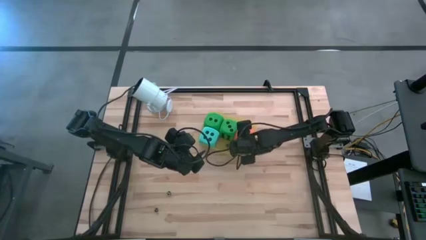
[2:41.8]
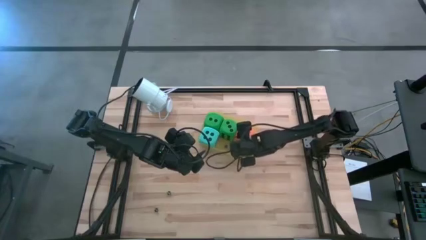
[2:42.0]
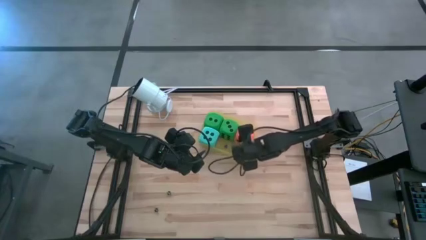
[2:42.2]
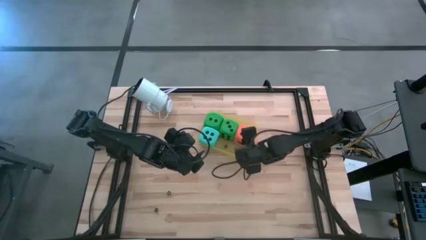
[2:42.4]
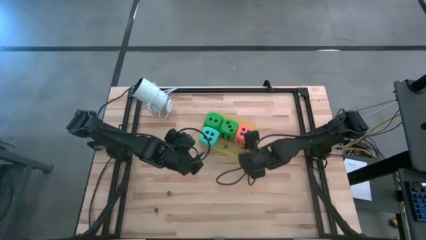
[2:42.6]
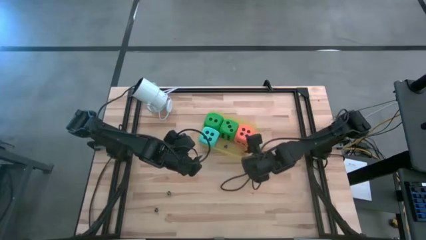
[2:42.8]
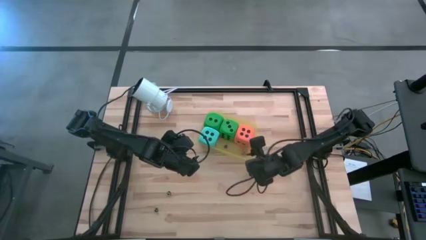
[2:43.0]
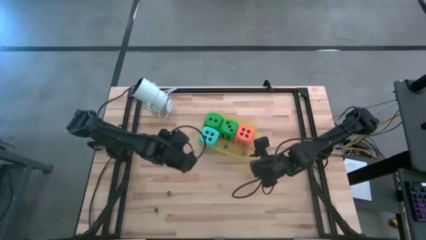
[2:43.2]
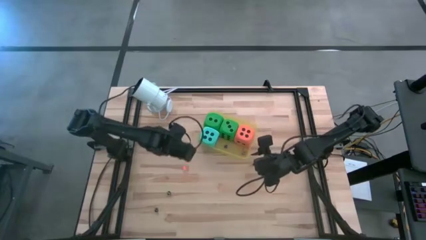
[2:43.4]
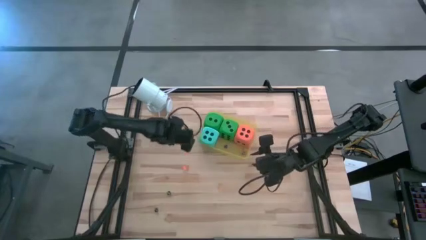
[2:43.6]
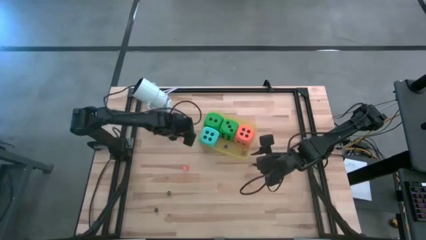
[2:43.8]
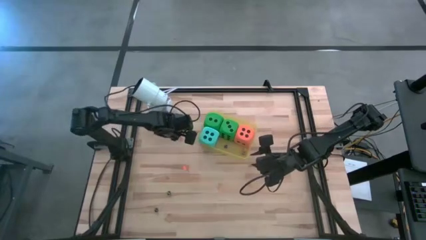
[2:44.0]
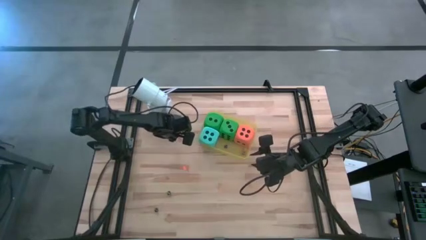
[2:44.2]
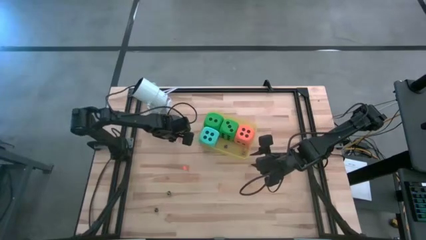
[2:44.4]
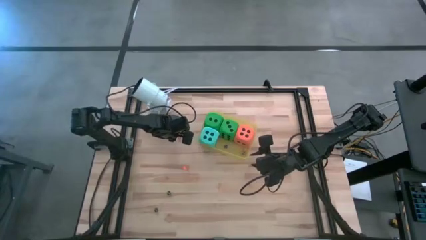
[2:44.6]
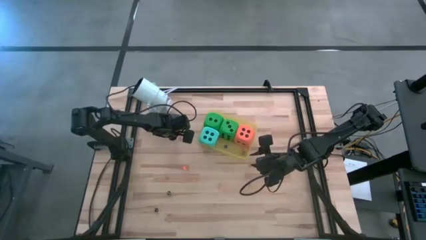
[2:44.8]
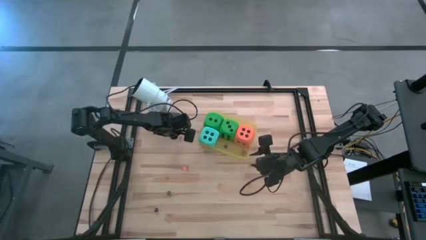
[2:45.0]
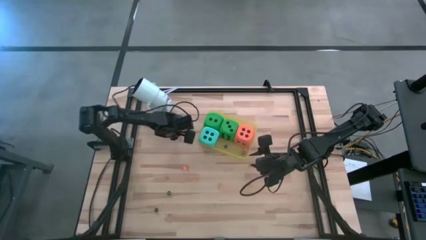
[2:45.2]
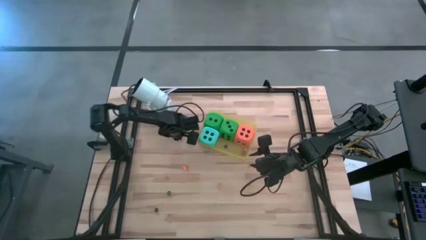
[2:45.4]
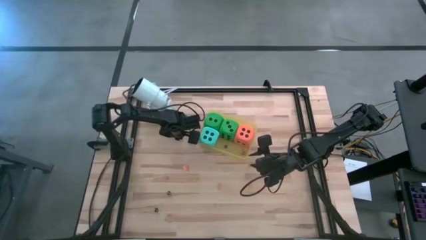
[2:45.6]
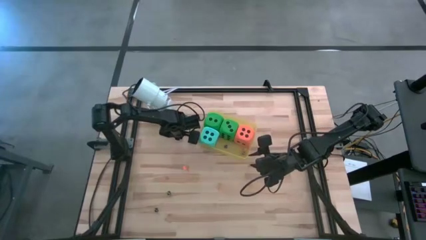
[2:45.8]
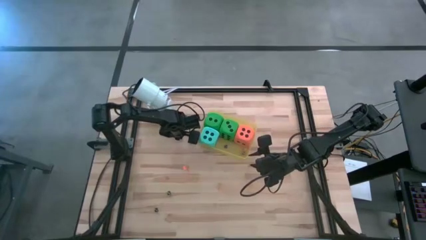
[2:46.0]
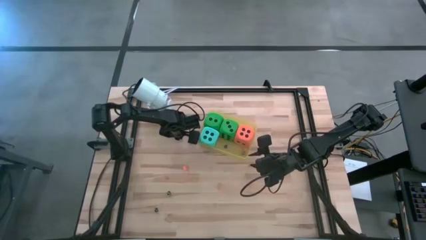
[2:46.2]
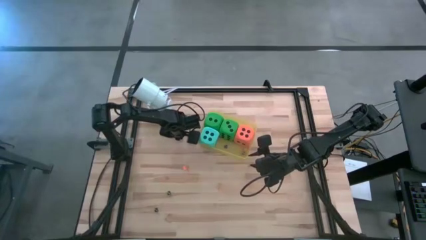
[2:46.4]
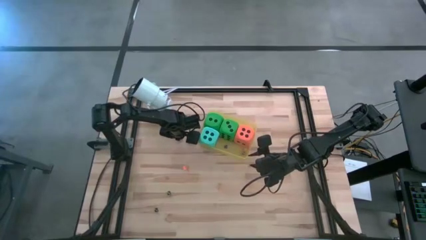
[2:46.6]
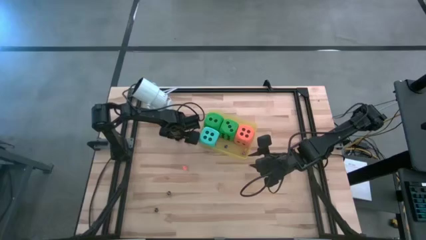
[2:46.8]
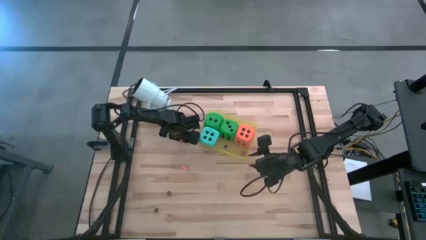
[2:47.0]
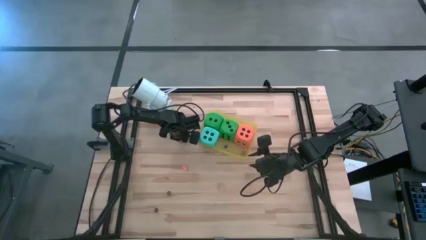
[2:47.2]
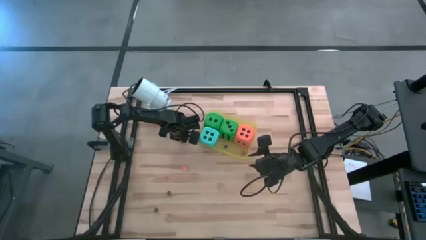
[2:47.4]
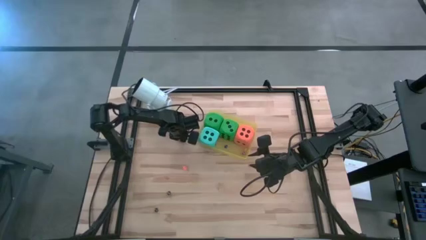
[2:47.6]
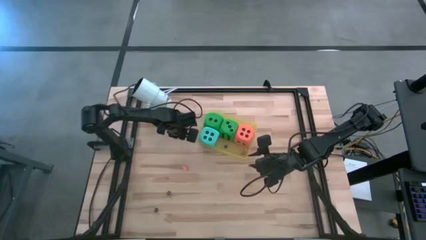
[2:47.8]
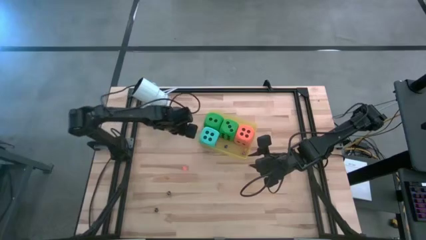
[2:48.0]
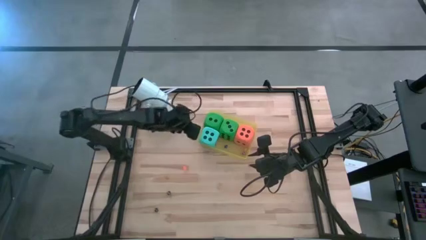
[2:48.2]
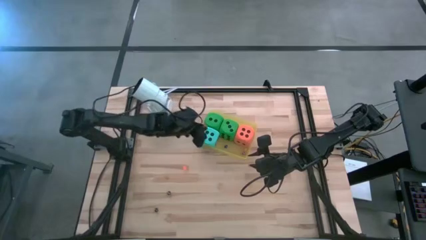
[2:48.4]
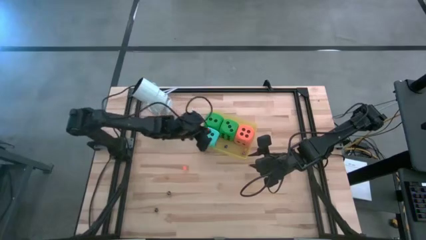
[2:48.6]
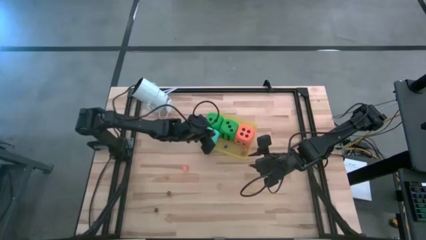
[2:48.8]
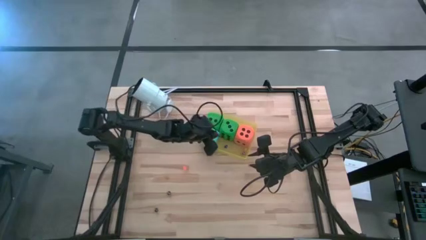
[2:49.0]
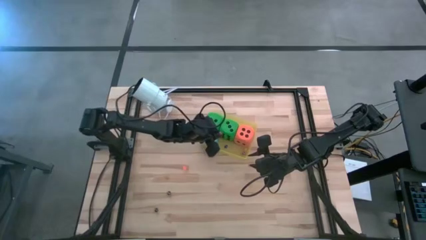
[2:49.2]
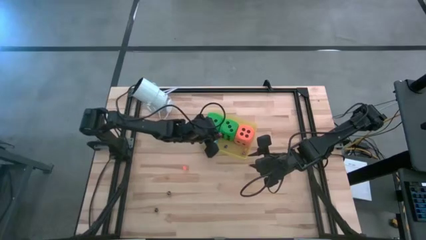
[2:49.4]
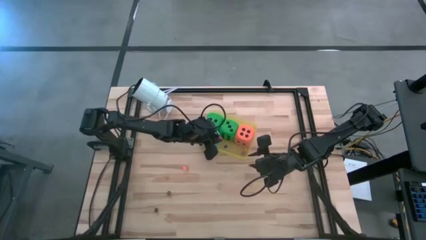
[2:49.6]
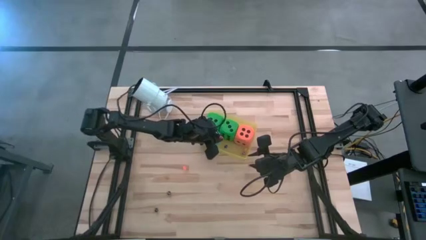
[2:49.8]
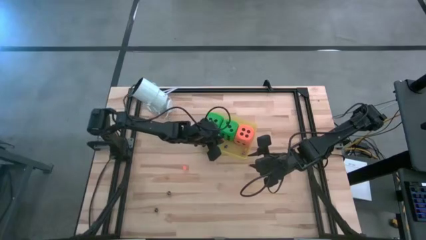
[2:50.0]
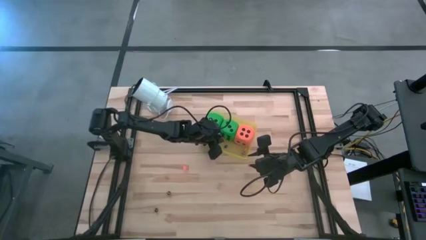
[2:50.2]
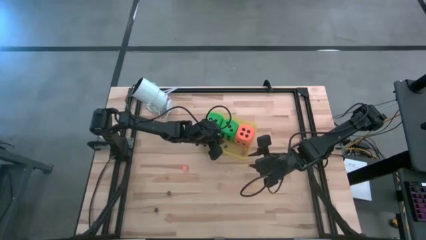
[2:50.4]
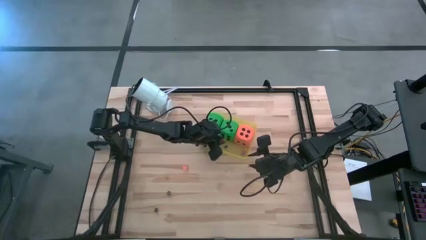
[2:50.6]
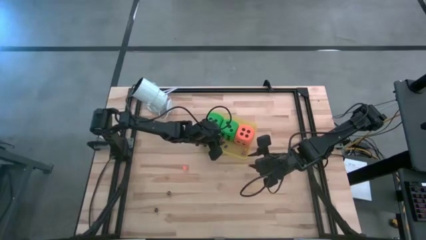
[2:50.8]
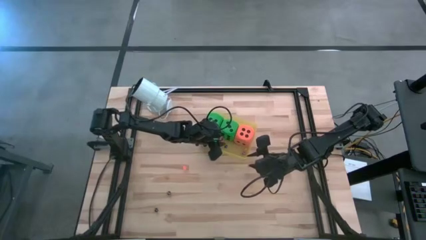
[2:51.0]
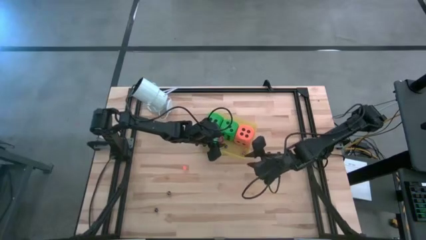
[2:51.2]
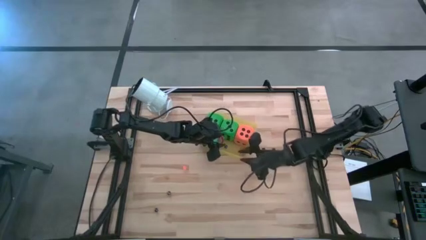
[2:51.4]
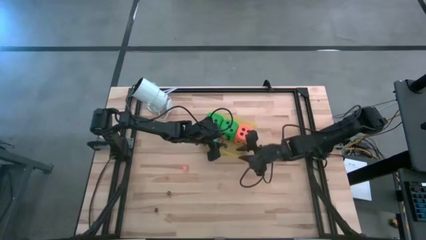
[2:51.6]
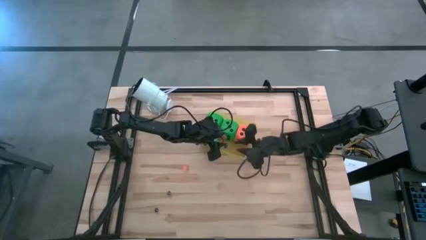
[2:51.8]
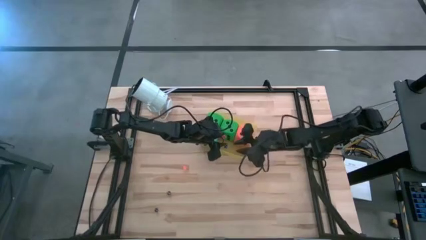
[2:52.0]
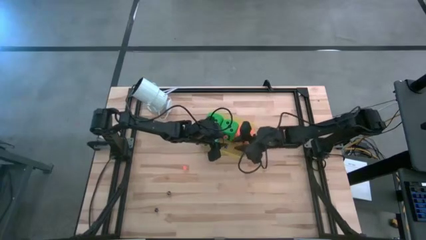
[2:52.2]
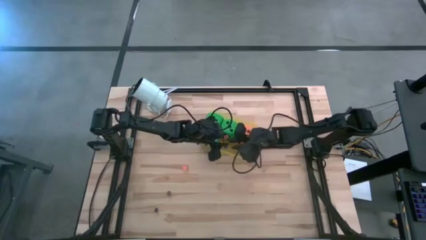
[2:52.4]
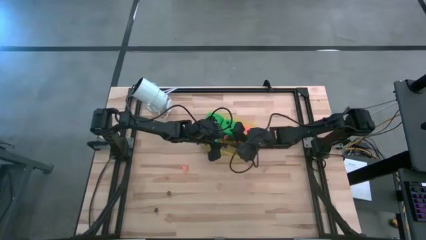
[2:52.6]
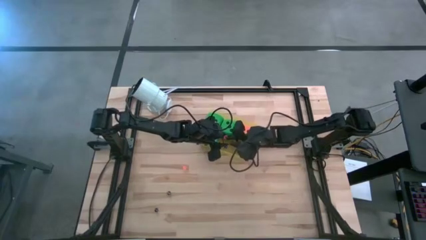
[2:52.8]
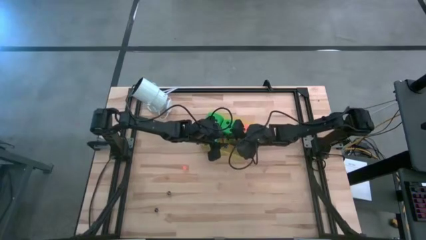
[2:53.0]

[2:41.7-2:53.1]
Task: Pick & Place Dice
Put the small red dice into the yellow bin

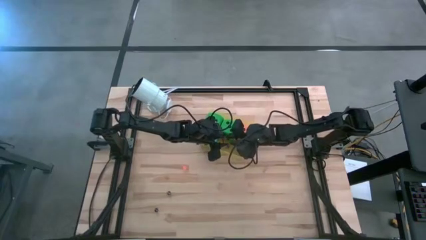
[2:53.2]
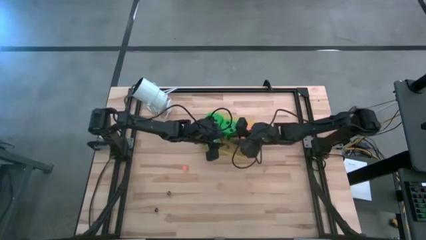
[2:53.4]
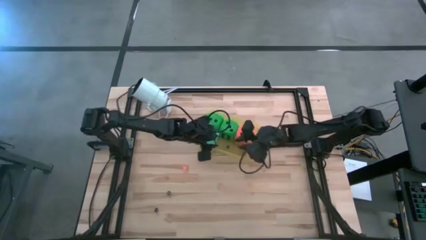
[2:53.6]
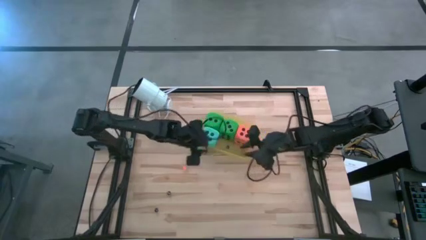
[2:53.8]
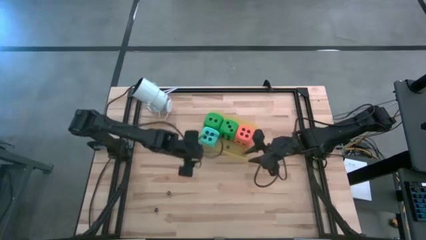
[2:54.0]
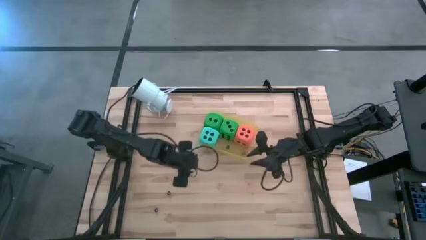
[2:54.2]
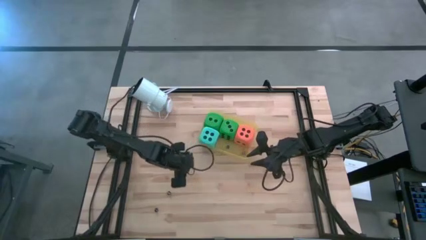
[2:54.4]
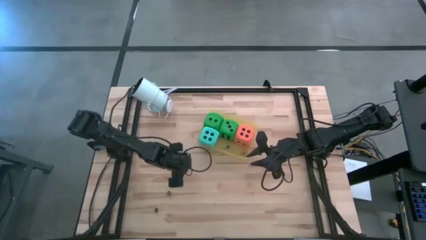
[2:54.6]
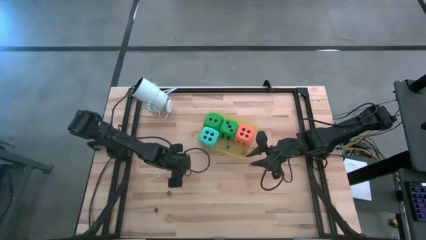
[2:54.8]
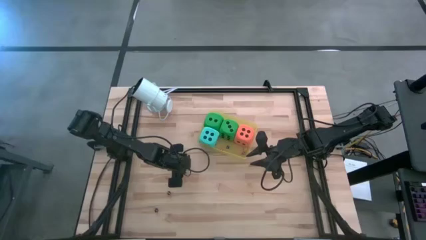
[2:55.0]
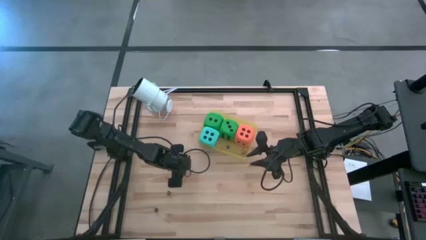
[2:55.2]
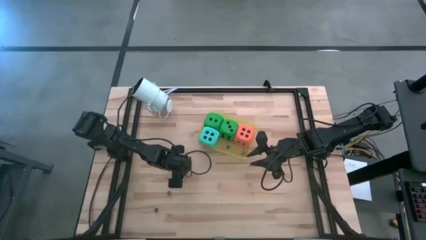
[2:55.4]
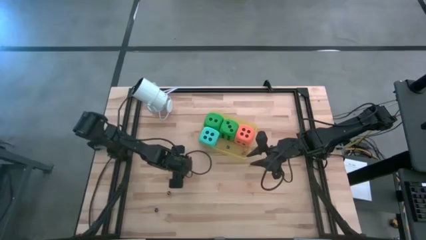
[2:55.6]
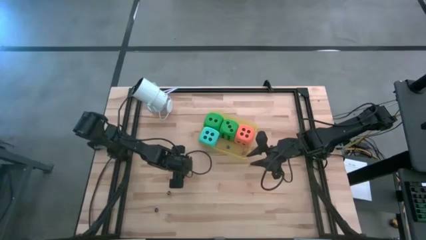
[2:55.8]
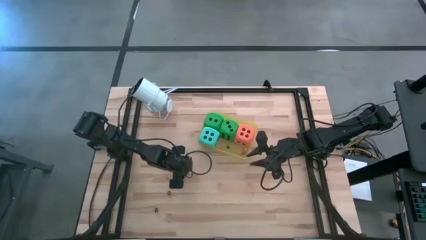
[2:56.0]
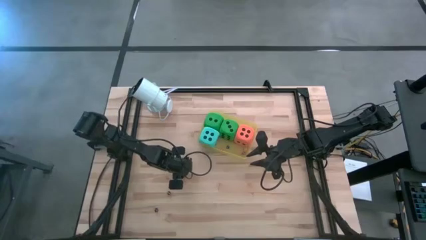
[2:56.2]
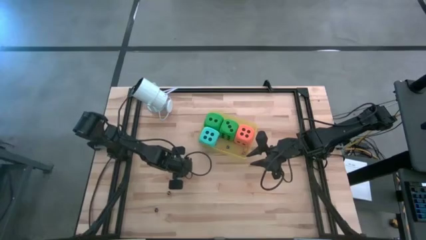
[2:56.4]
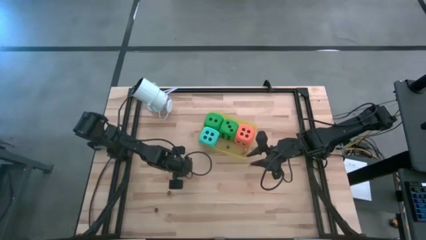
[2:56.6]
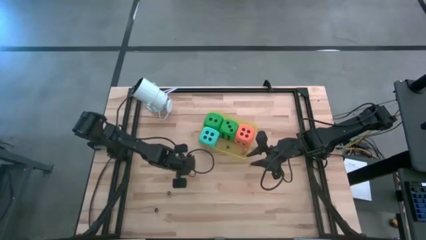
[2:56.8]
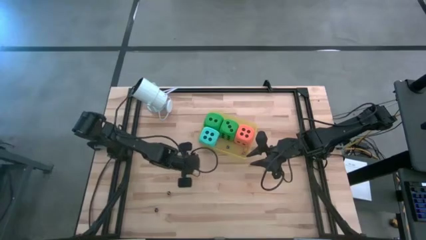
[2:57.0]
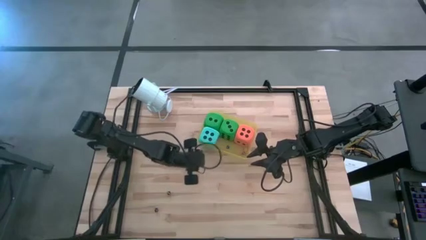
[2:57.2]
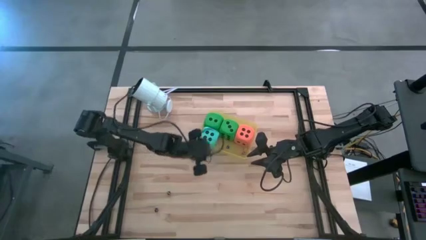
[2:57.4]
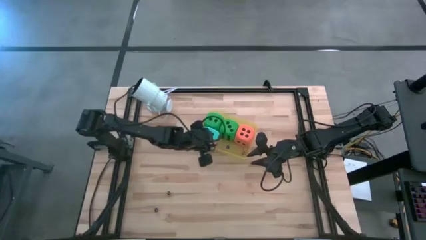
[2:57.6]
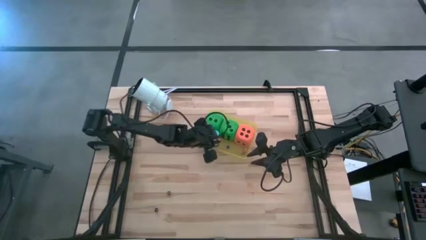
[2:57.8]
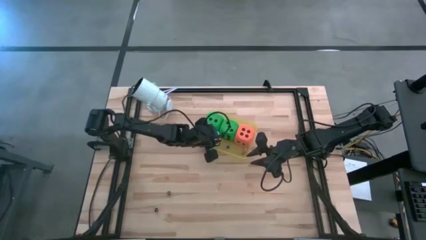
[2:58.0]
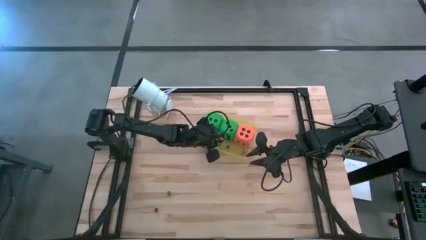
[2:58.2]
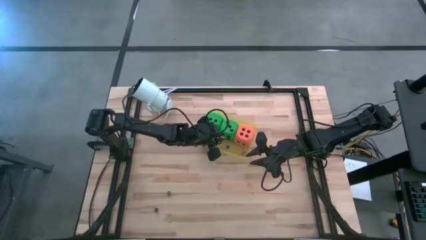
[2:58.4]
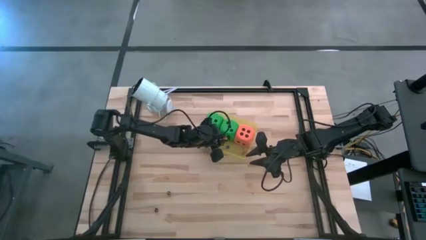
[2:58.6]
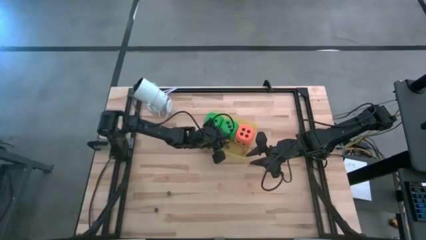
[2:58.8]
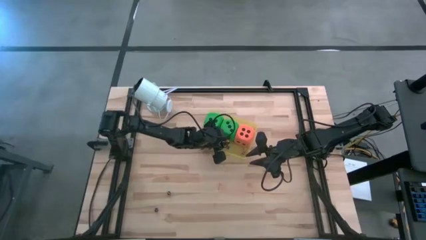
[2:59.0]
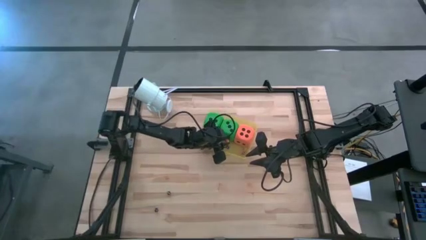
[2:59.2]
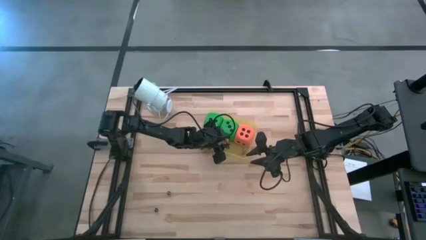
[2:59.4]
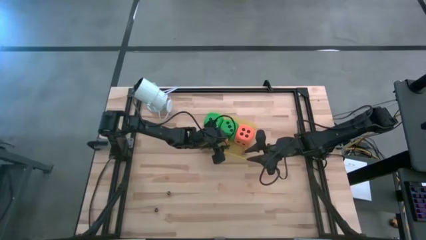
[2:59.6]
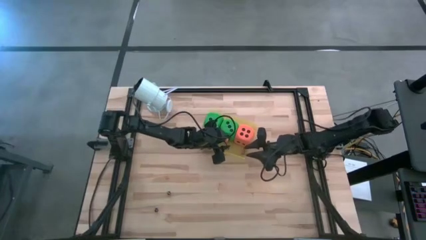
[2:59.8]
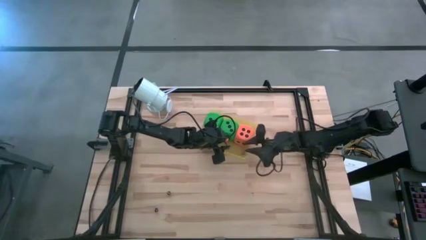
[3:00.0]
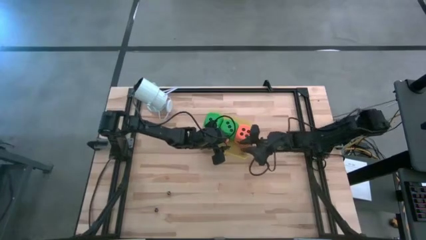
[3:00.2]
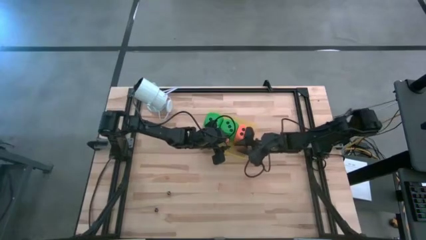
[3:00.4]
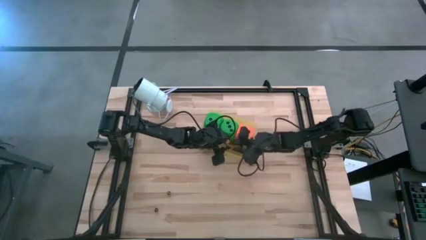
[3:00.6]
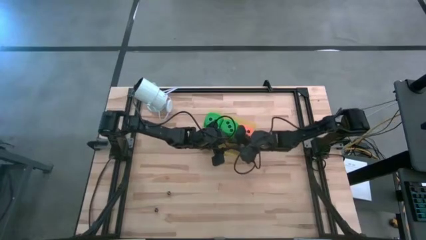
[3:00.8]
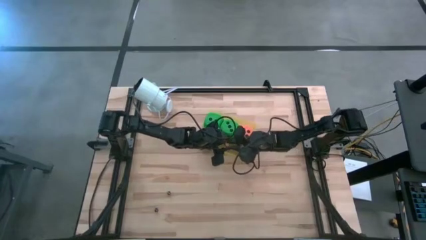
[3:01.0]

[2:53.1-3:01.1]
Put the small orange dice into the yellow bin
